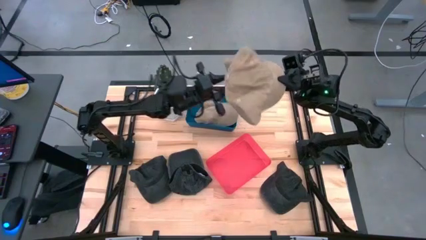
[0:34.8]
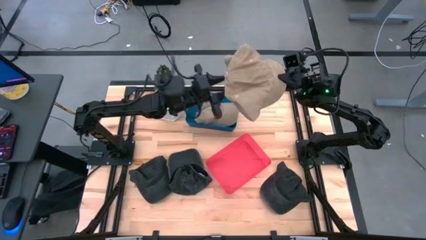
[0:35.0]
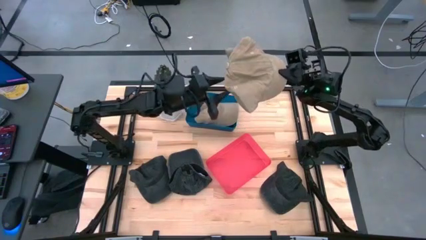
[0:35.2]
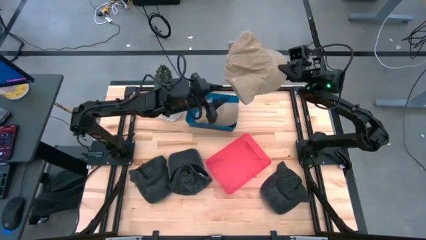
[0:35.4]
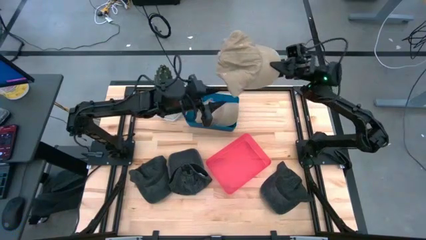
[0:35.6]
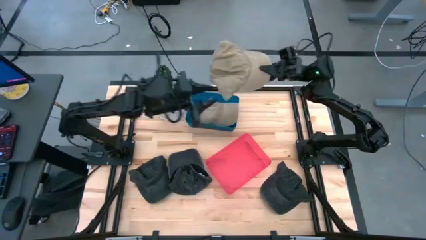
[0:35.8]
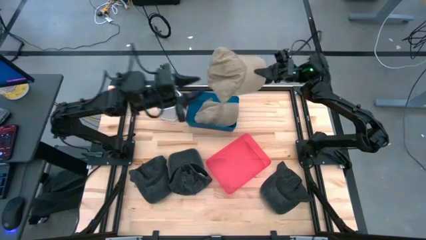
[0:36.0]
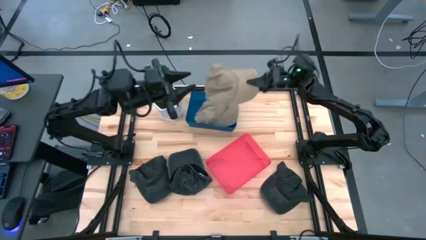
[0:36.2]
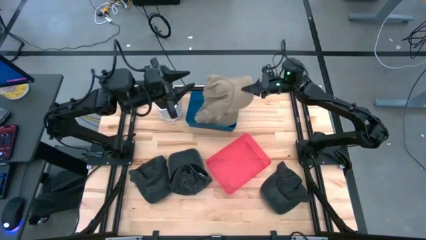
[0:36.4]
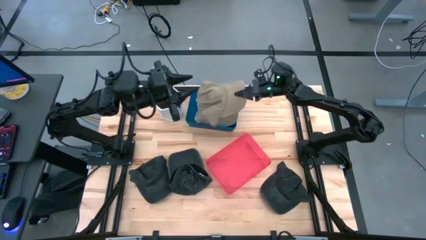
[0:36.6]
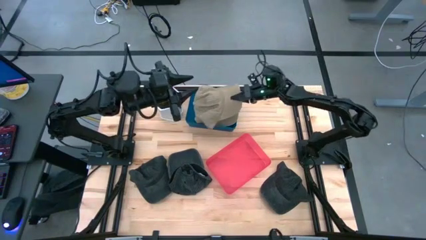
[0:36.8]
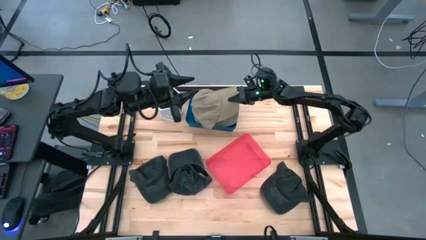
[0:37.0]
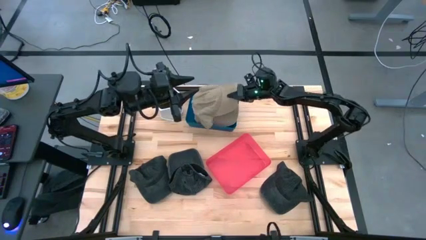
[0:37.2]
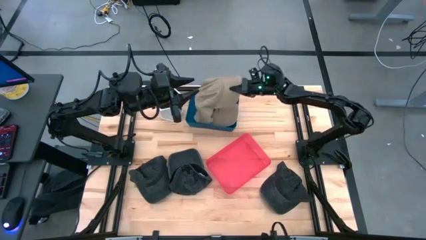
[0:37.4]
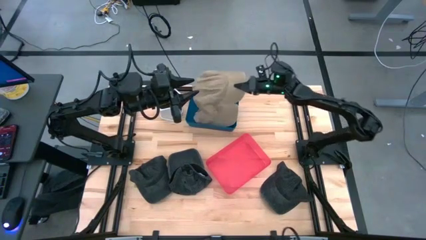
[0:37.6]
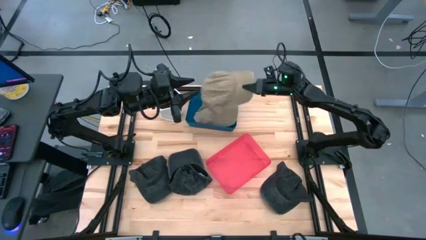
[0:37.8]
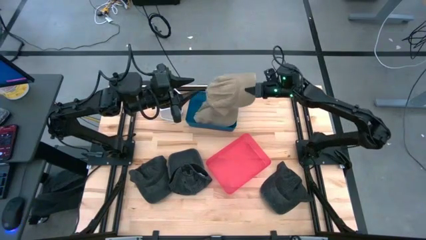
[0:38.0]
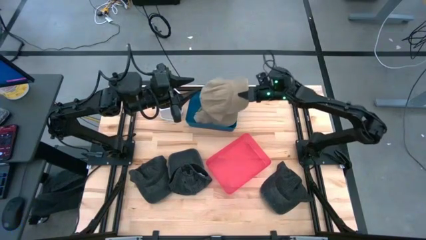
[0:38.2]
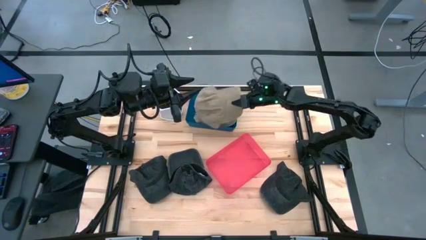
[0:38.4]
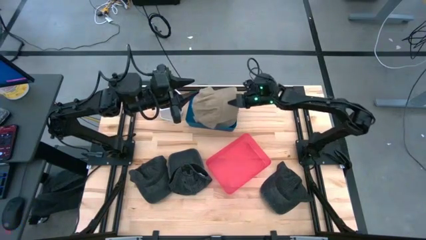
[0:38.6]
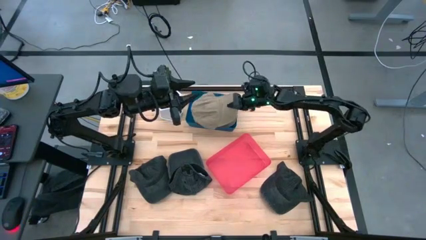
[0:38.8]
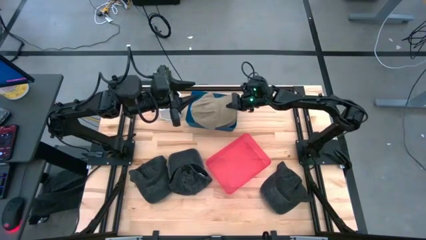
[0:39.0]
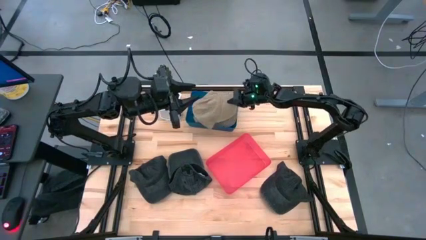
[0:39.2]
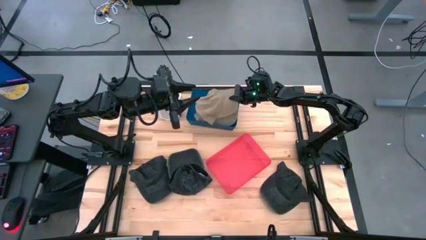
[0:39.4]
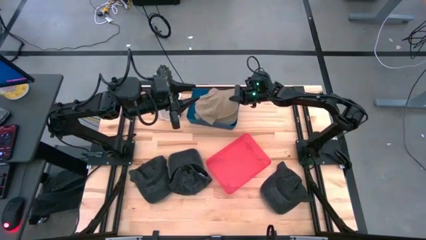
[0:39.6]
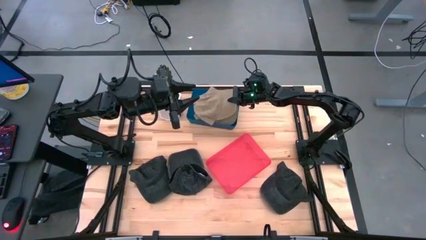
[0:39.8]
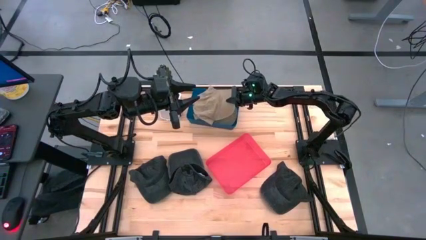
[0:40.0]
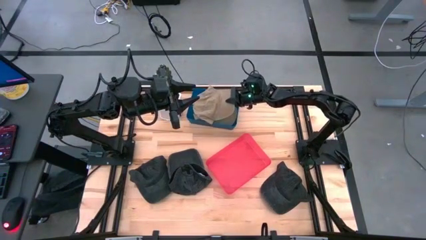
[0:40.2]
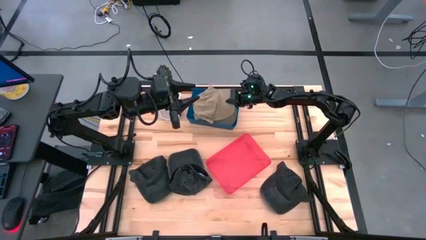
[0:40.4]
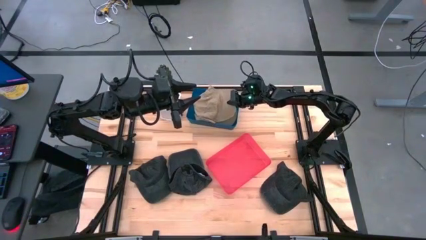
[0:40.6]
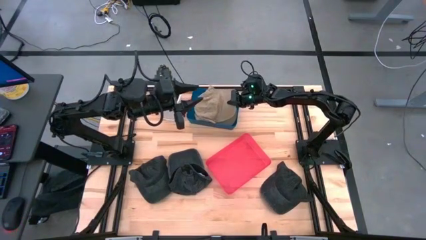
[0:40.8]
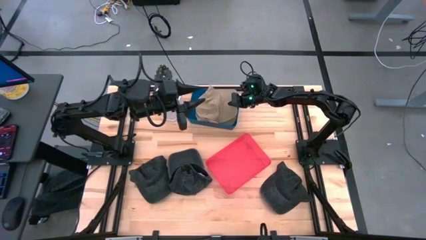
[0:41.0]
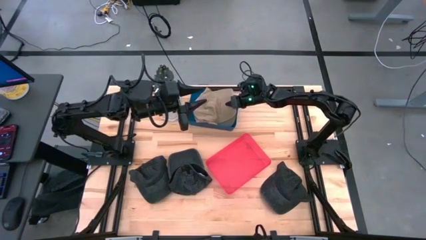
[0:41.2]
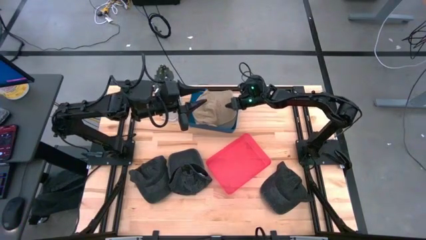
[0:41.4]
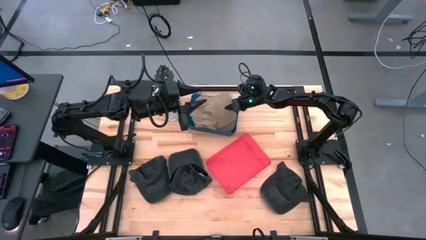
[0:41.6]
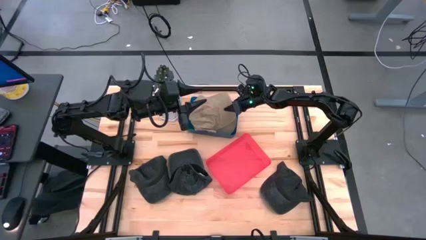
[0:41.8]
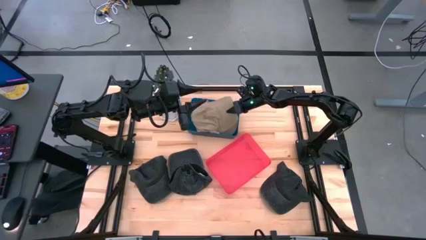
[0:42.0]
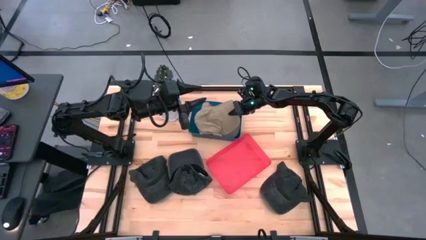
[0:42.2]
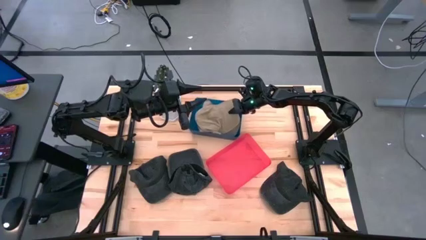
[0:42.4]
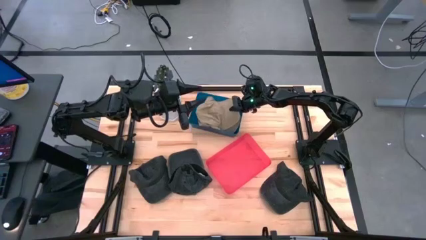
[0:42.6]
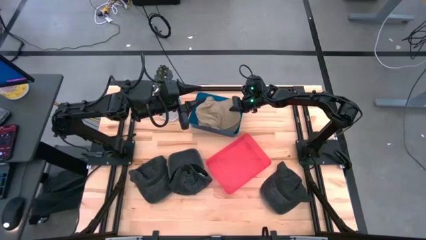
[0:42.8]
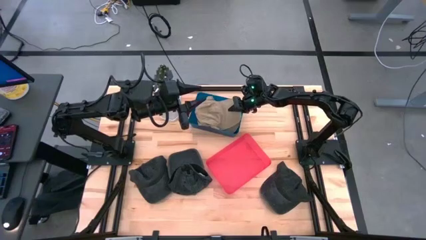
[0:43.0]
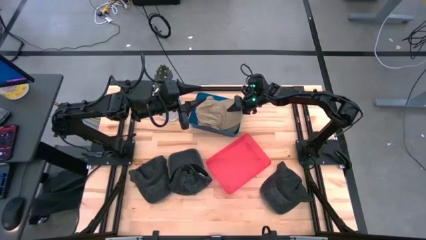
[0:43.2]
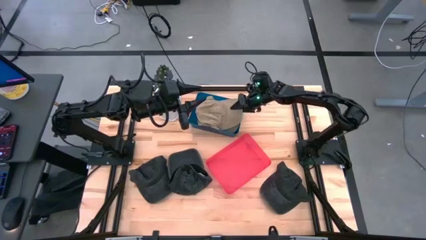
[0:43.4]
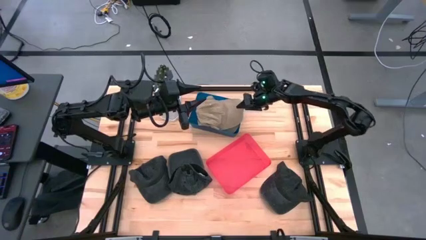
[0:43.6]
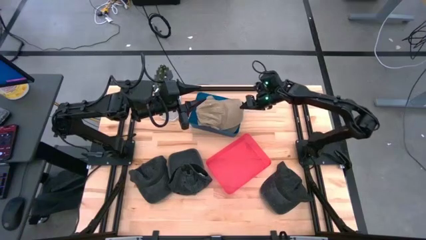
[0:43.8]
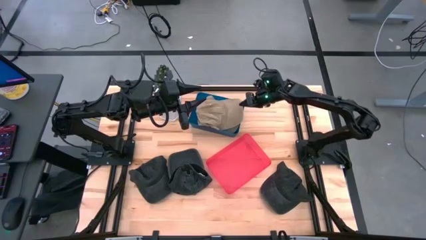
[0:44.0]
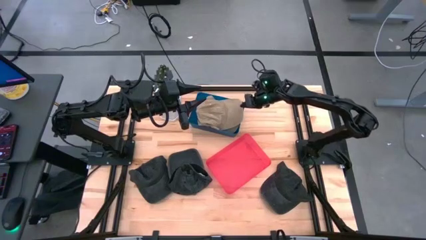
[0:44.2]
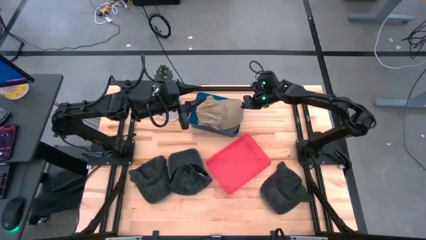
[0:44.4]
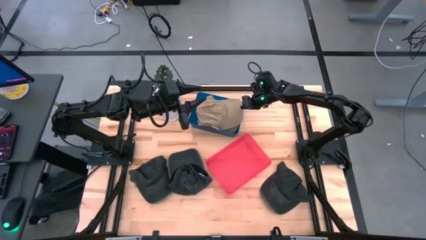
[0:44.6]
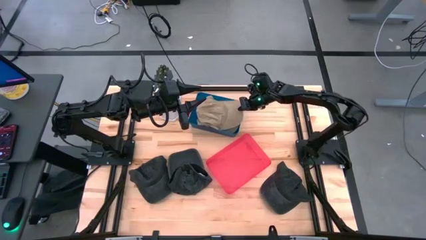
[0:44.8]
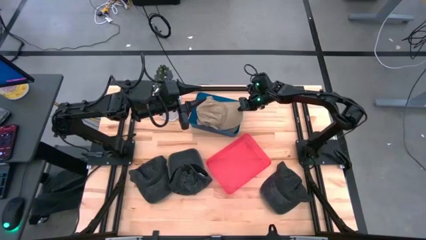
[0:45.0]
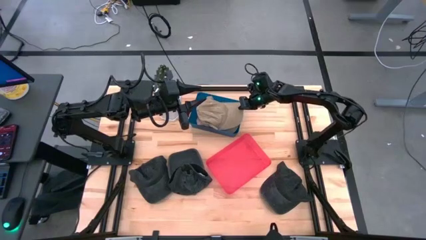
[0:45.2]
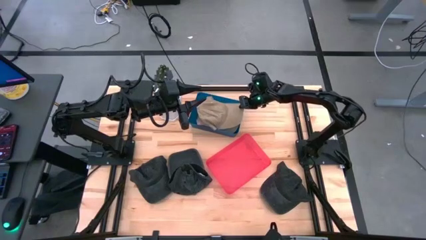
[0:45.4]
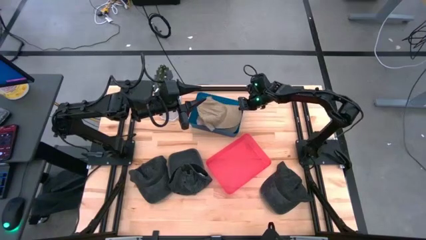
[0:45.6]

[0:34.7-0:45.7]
Task: Pick & Place hat
Put the brown cap into the blue bin

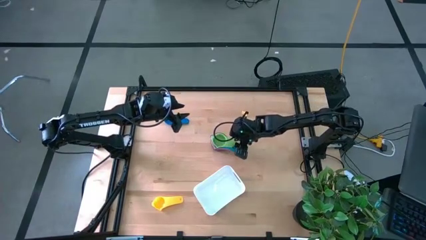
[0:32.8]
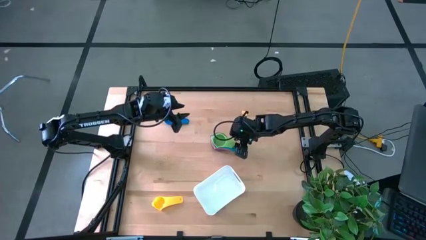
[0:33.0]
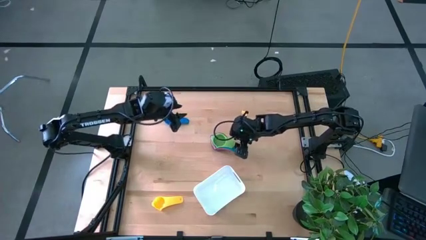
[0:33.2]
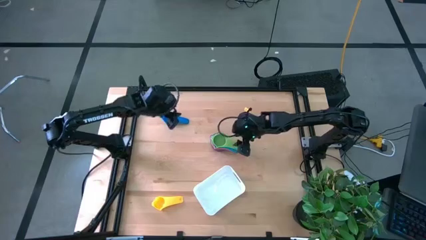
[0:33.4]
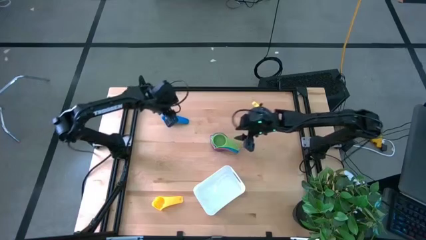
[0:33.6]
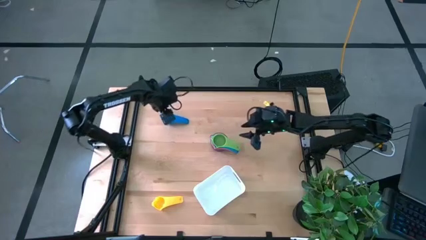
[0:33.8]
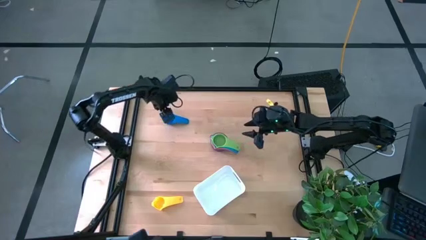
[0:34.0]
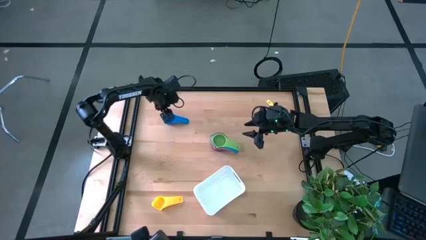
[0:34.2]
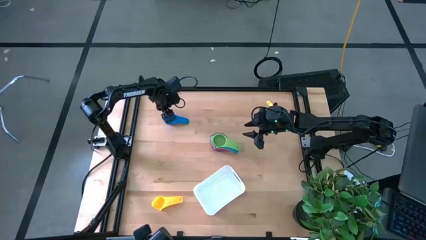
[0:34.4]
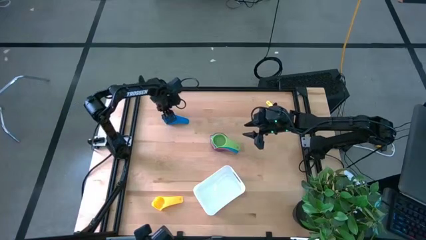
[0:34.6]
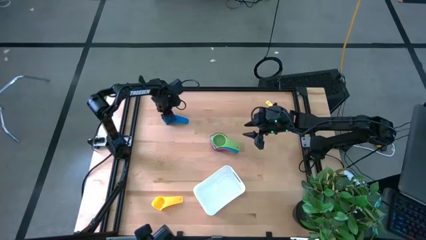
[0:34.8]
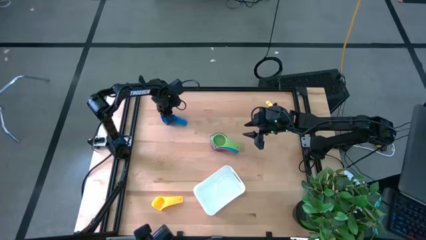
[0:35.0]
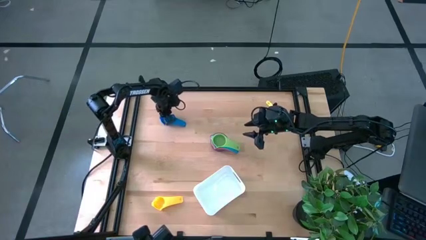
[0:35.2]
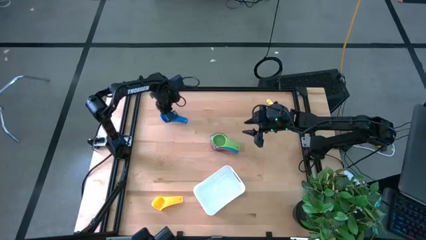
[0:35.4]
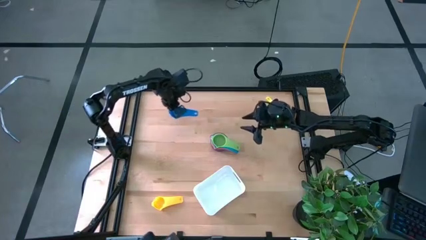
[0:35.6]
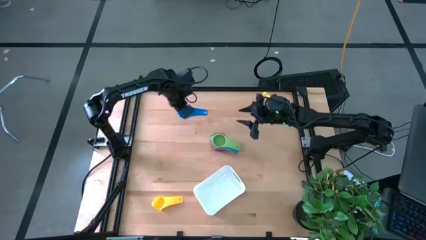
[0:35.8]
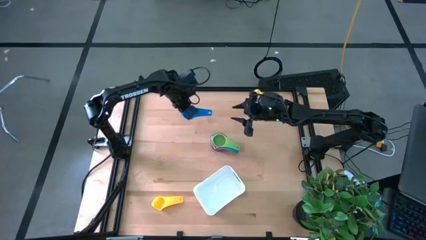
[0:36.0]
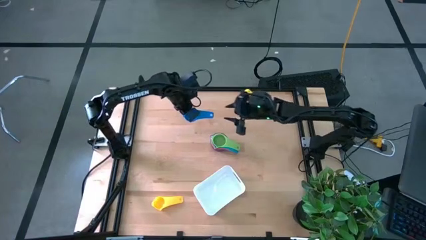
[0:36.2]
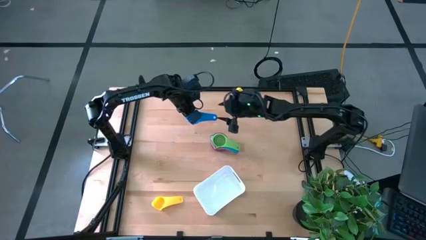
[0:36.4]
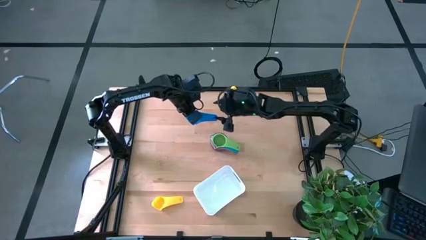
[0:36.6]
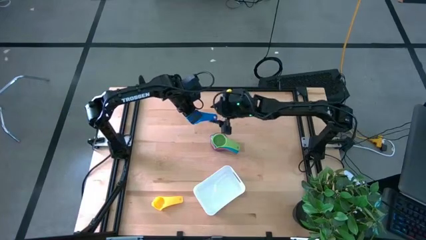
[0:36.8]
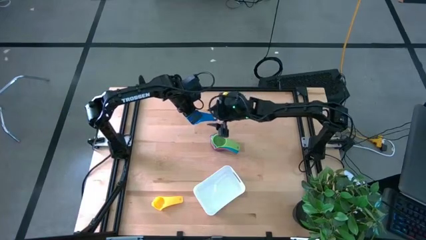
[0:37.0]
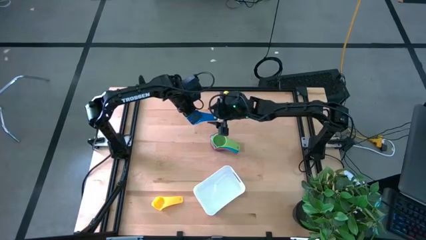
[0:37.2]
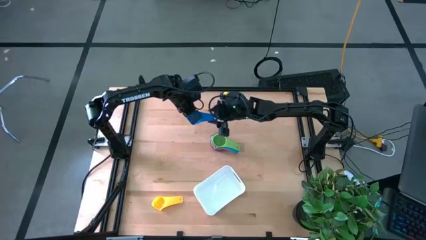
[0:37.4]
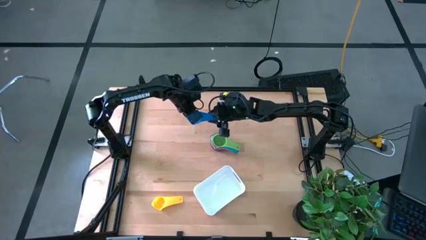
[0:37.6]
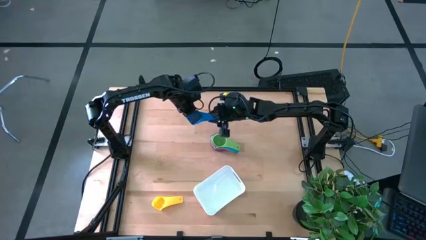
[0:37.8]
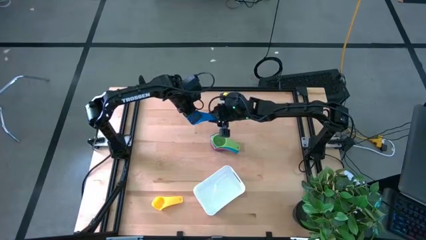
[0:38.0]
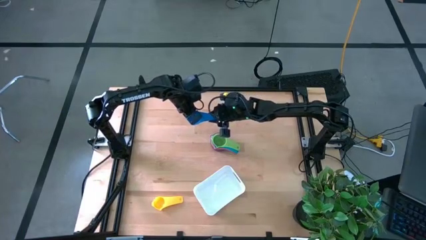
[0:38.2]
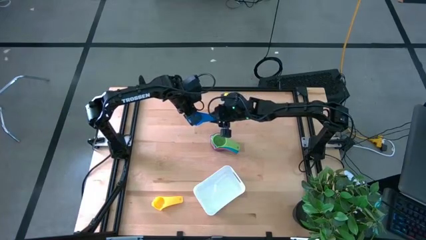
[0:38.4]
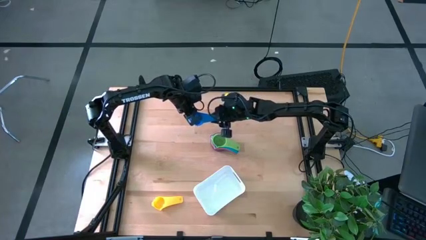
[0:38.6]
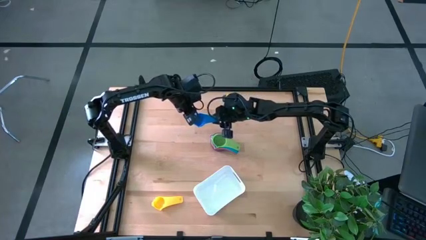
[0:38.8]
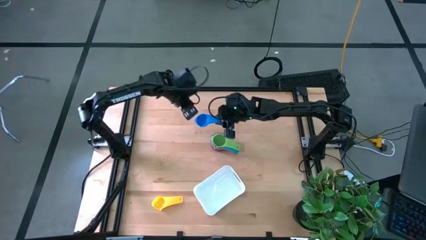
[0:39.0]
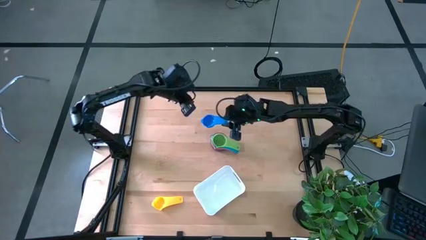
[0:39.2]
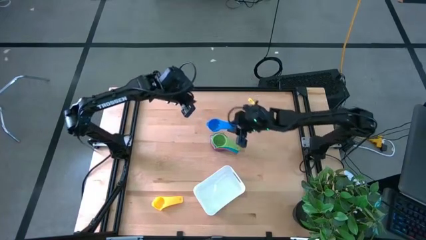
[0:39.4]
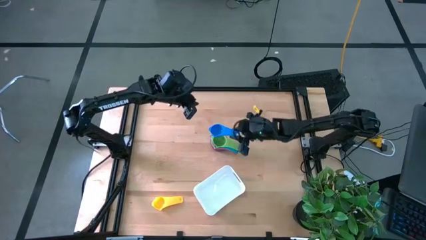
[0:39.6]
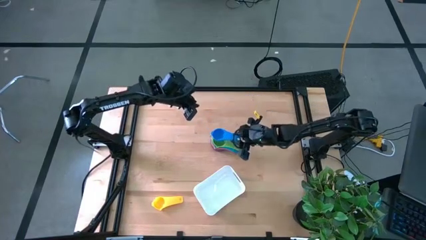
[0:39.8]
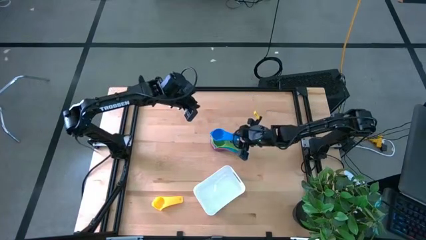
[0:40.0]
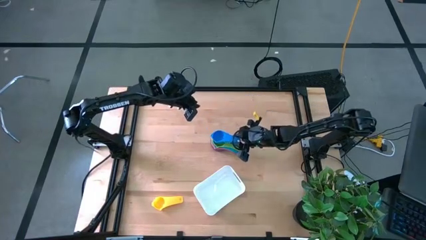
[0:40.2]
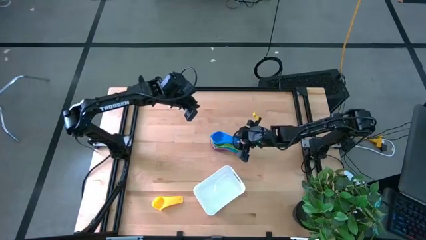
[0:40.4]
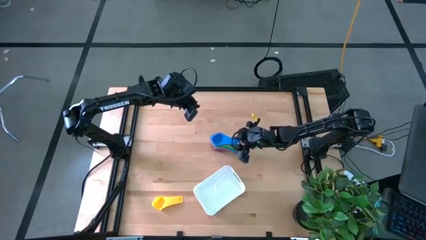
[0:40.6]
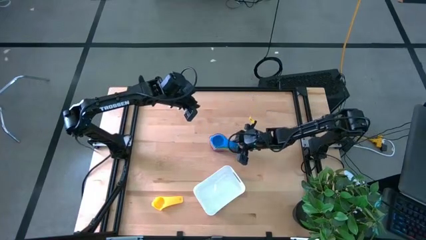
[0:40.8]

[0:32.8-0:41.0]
Task: Nest measuring cups in basket
Stack the blue measuring cup on top of the green measuring cup
